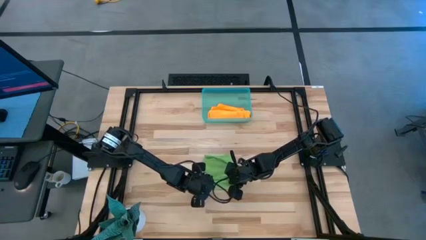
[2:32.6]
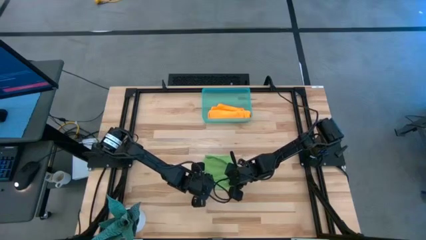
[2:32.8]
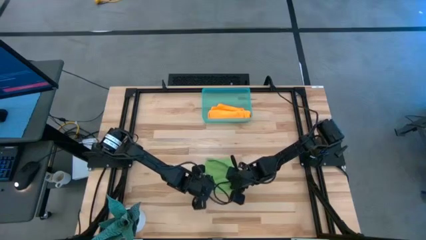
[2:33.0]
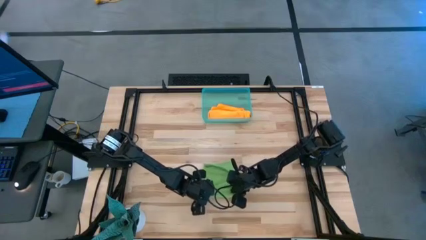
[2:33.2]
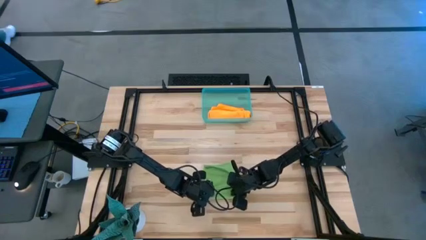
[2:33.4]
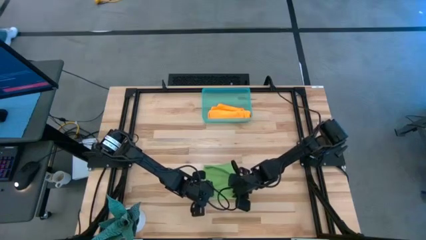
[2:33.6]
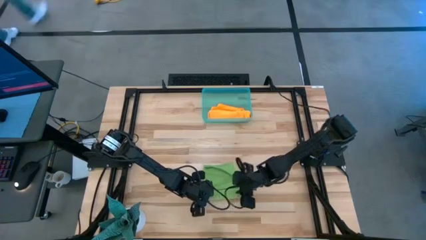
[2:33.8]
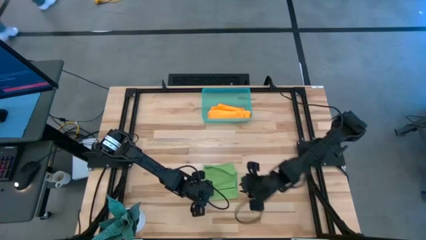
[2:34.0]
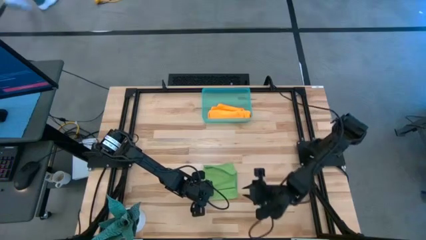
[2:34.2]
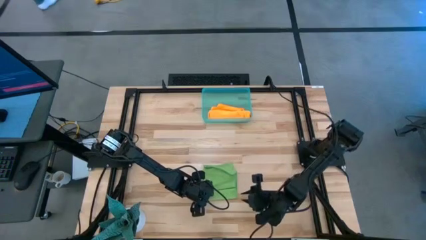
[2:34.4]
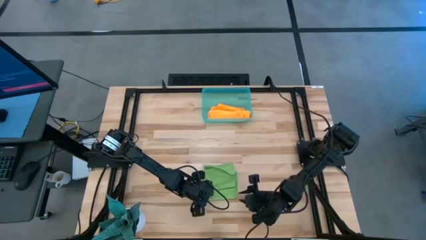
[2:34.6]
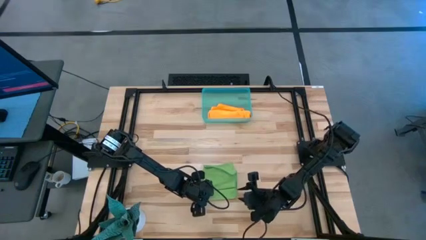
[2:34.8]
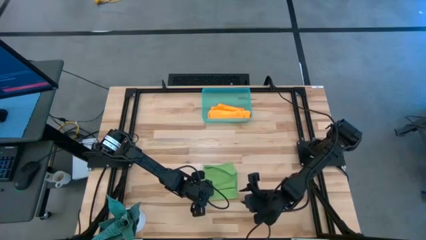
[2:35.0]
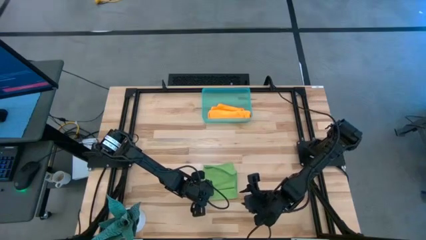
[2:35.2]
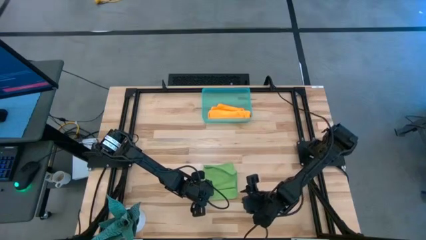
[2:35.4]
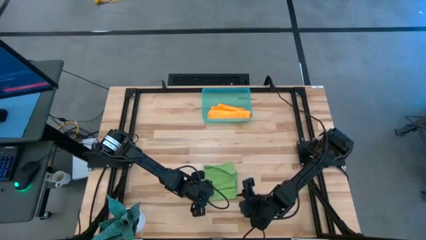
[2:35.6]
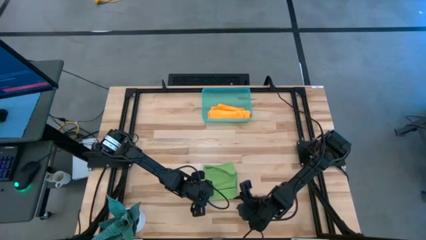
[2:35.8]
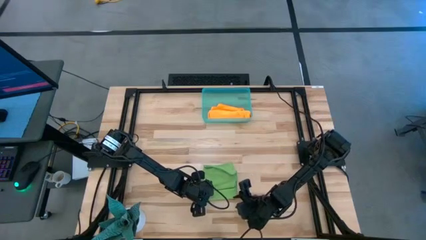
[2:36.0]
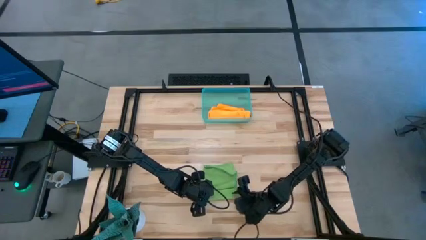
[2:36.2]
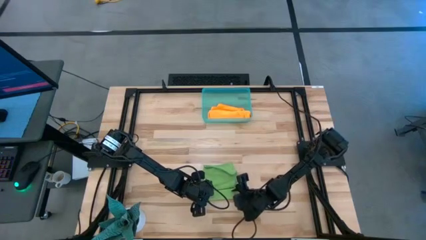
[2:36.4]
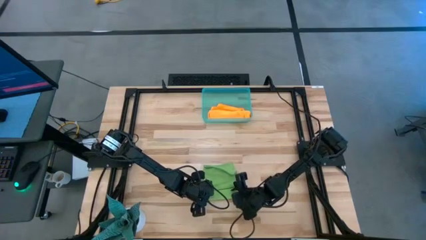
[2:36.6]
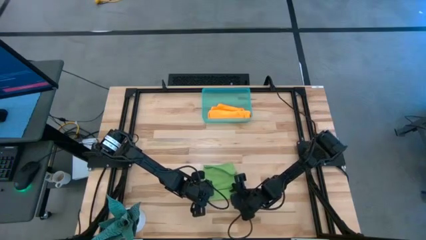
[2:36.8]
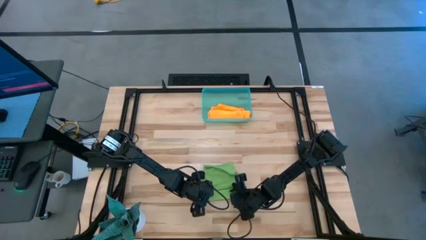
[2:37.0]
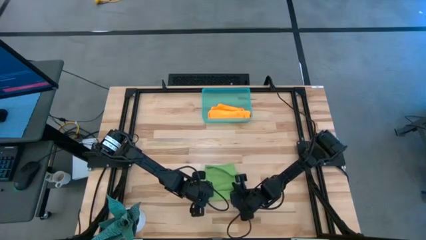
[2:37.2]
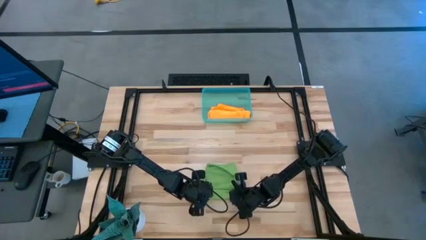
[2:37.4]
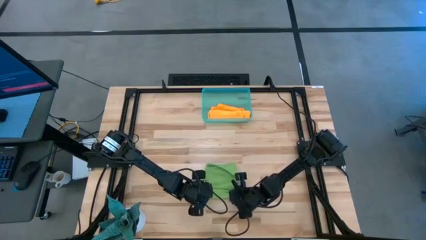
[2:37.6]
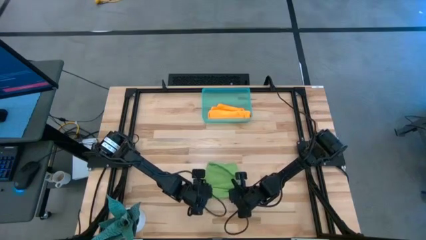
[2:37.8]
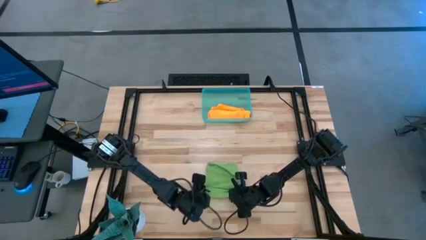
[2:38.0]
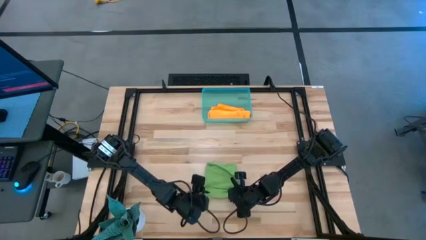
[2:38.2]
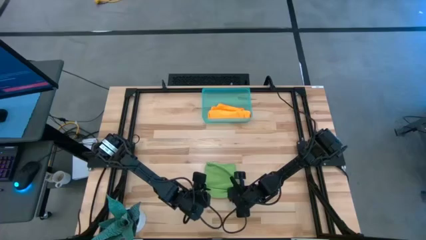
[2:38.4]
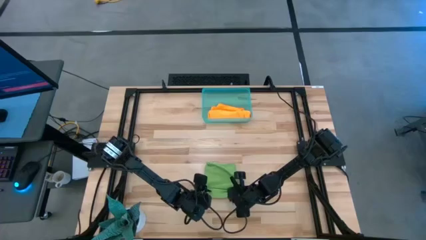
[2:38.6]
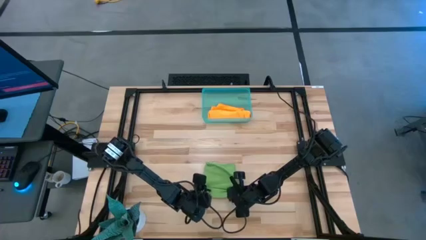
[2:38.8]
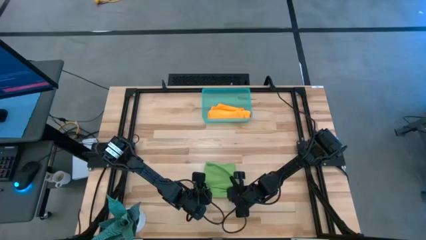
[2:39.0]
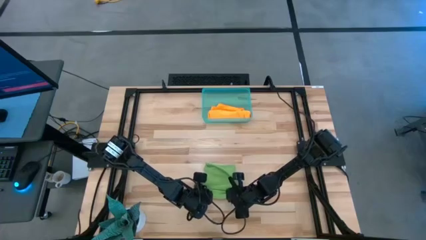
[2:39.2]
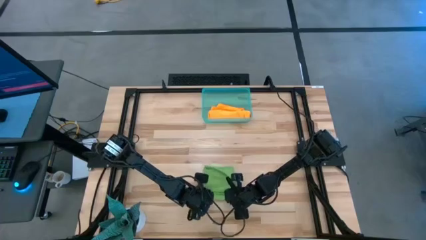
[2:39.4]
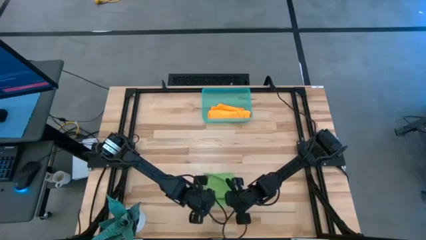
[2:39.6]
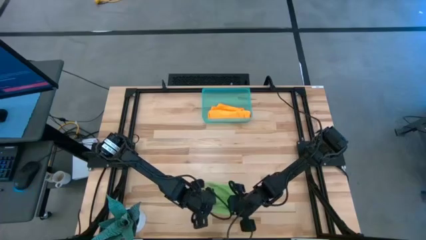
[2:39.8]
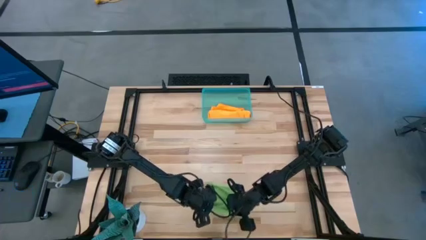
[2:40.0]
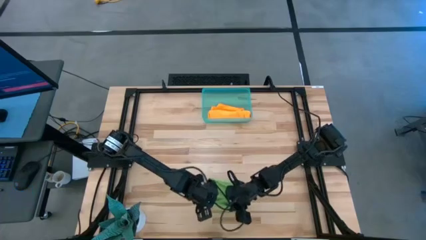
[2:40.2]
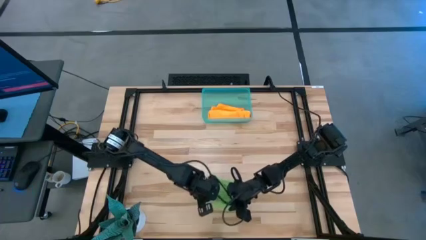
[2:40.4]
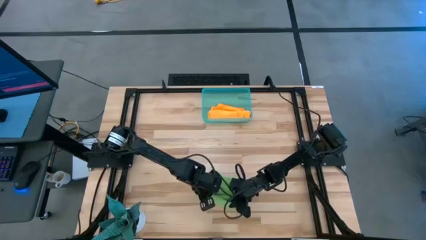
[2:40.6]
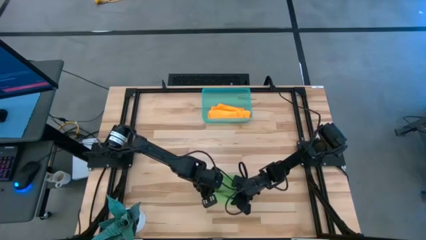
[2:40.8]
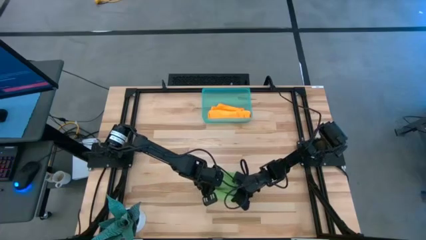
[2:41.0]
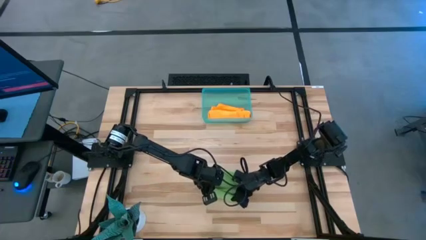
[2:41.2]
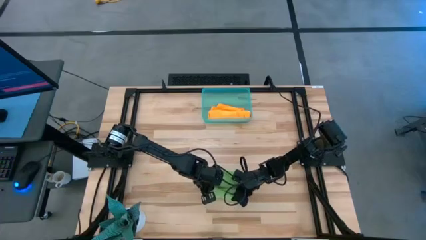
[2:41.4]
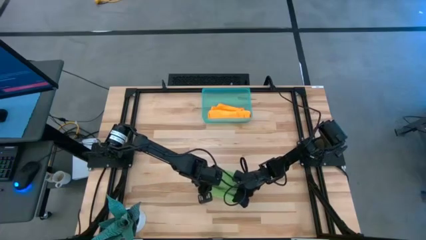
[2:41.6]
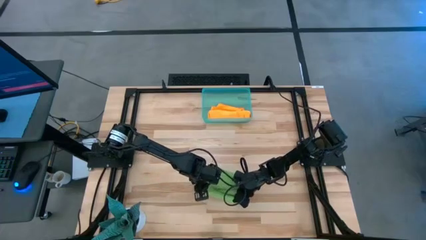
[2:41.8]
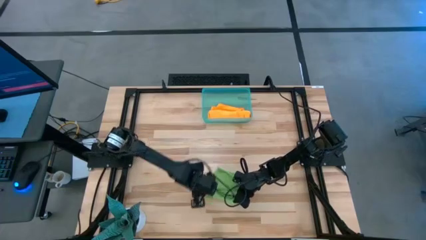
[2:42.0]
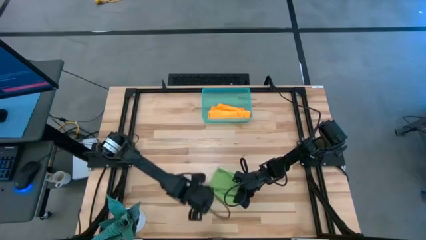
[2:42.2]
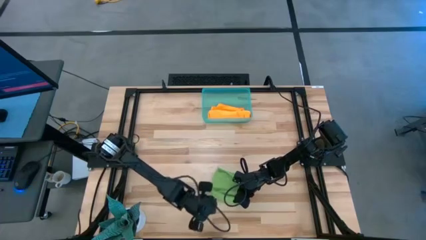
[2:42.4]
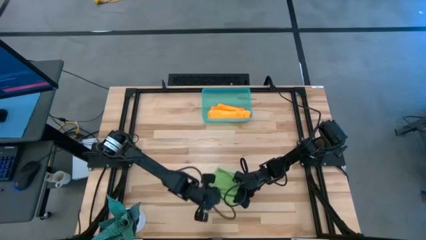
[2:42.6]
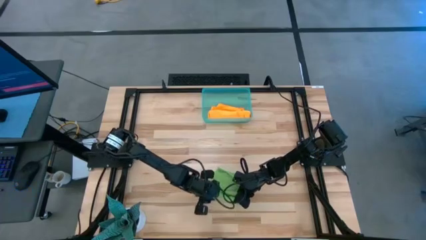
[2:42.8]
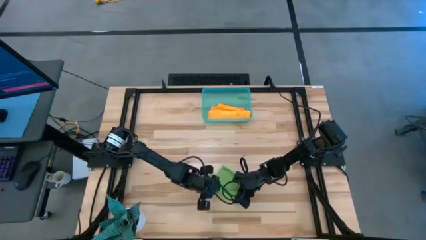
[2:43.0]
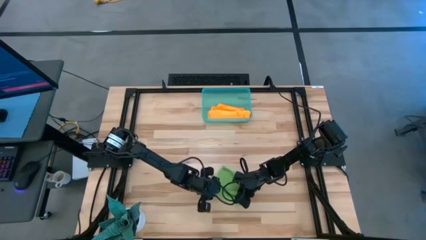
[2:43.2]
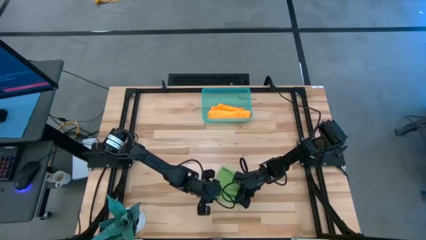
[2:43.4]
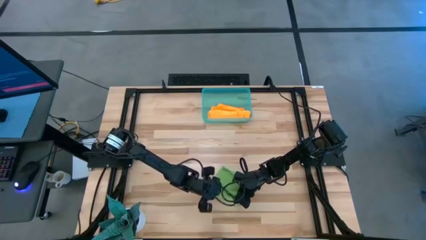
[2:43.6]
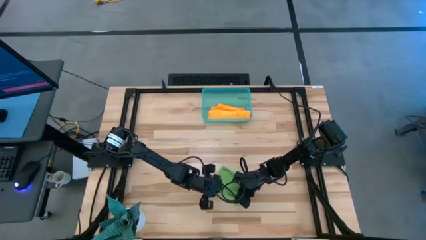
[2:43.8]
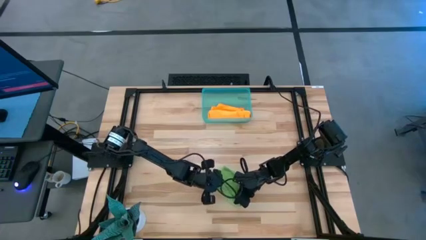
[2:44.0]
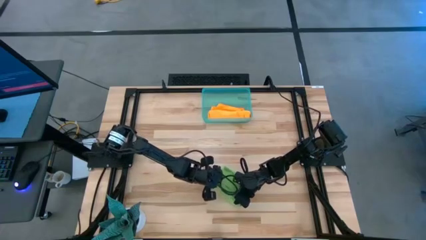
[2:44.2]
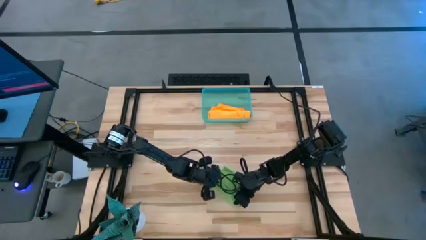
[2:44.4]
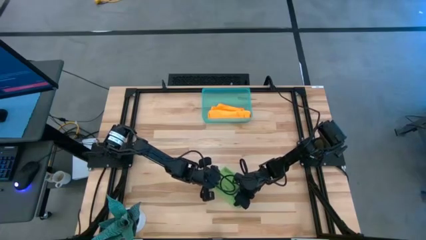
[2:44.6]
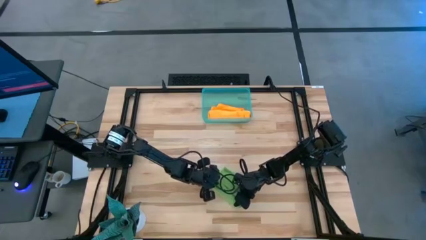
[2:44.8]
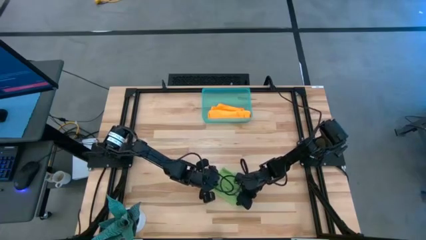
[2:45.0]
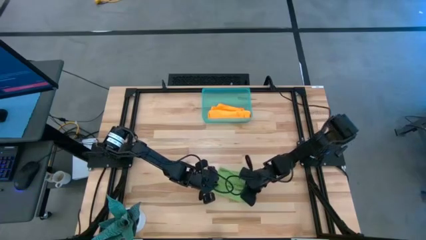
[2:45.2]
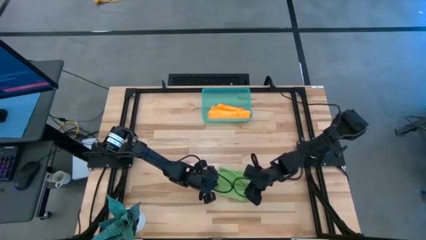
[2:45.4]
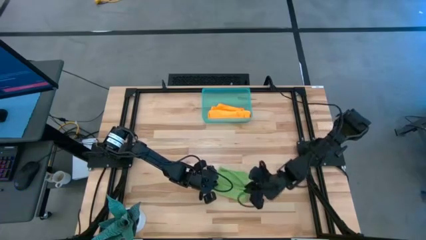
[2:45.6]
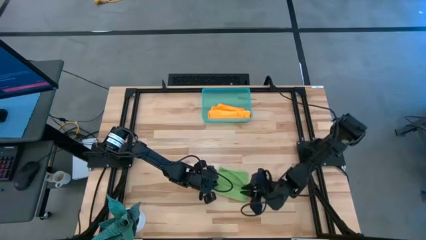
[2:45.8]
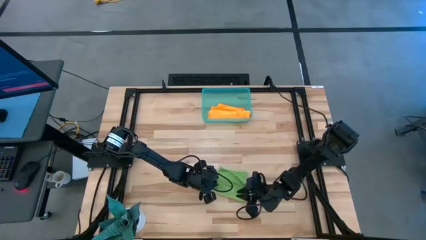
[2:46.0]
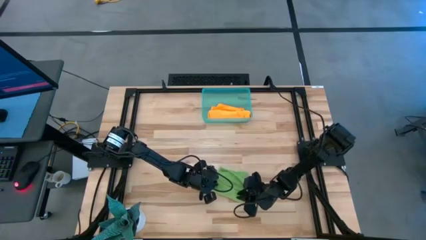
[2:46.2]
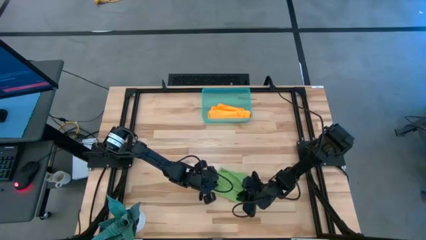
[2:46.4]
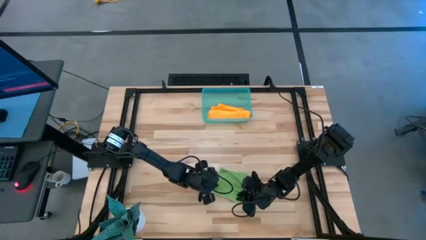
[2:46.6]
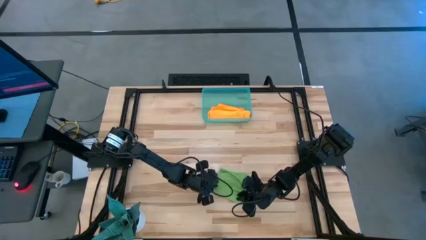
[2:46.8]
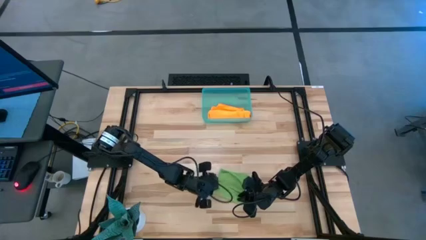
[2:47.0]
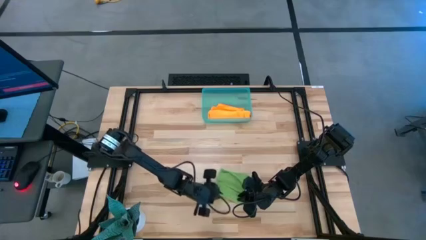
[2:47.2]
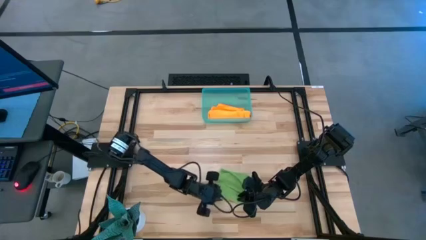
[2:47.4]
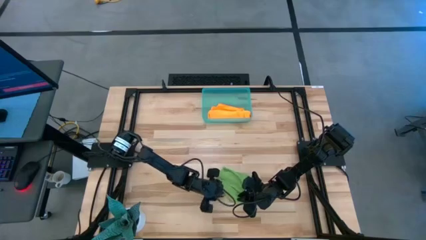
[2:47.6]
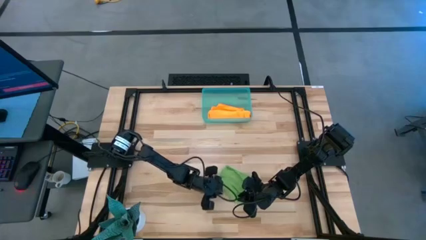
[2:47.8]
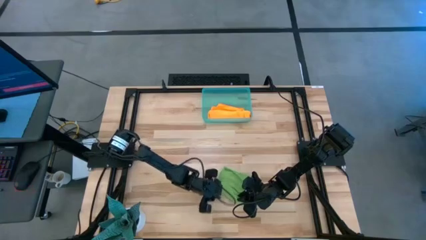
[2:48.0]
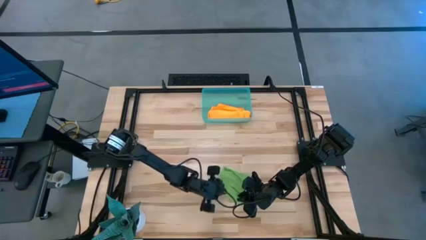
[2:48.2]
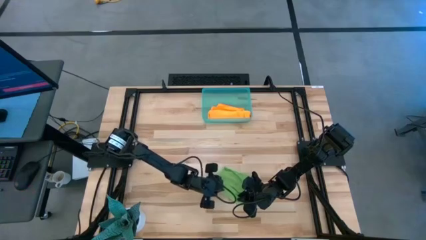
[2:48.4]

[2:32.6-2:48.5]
Task: Roll microfiber towels into tight, uniform cylinder then place into a basket
Roll the green microfiber towel
